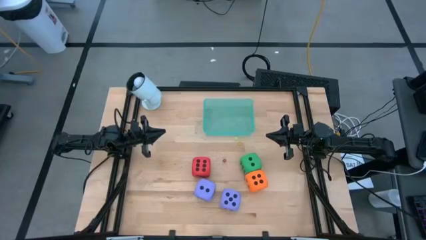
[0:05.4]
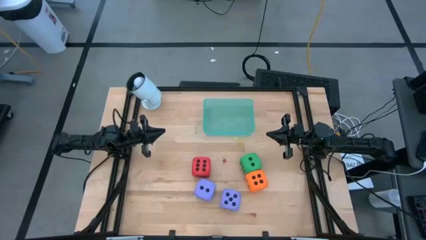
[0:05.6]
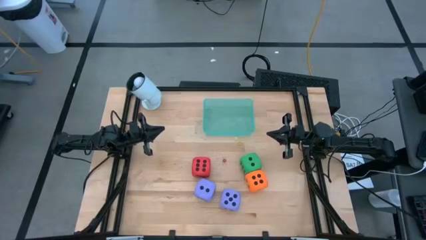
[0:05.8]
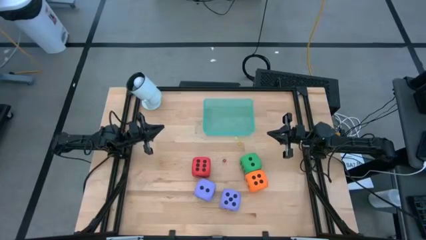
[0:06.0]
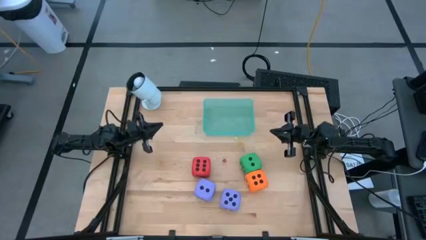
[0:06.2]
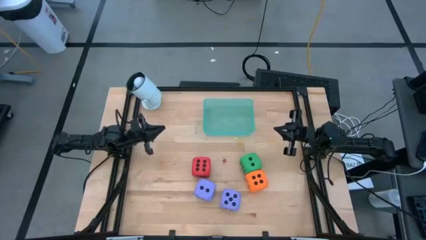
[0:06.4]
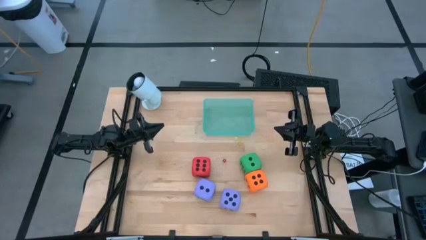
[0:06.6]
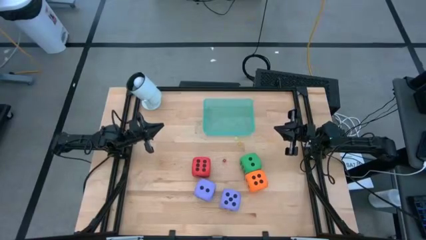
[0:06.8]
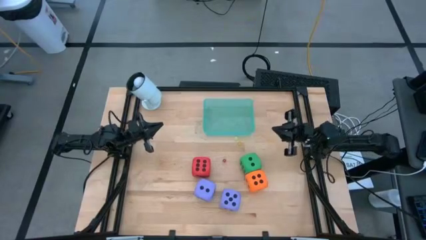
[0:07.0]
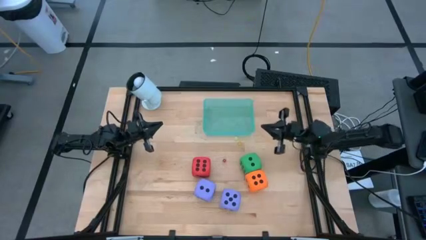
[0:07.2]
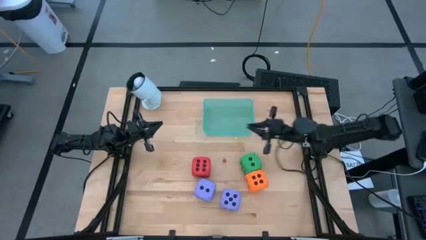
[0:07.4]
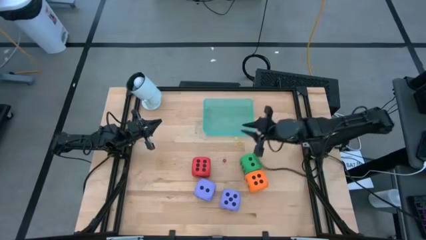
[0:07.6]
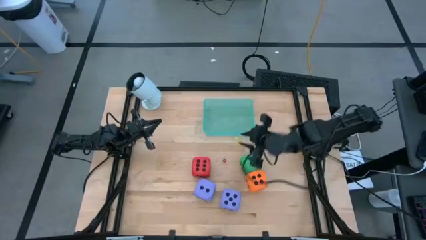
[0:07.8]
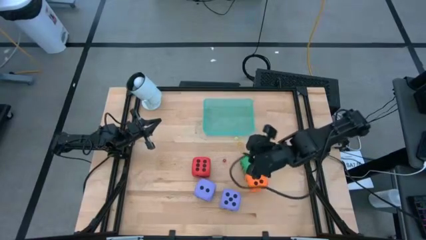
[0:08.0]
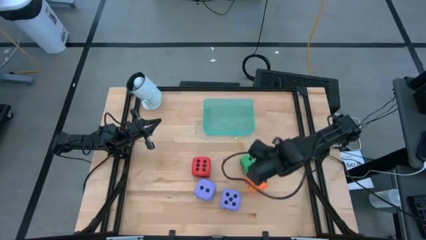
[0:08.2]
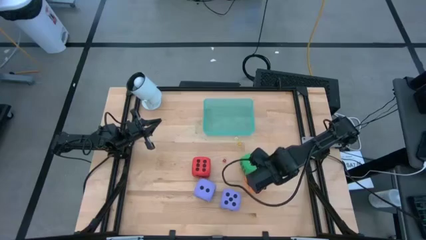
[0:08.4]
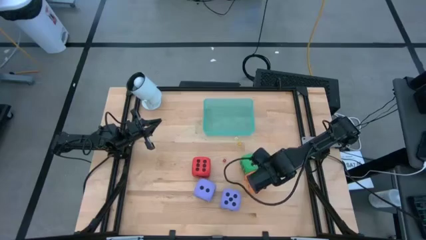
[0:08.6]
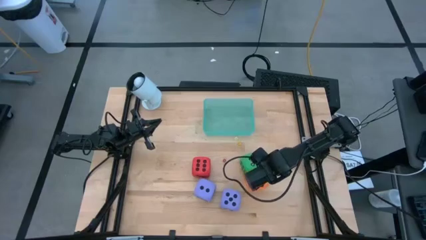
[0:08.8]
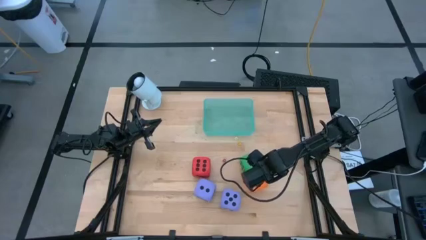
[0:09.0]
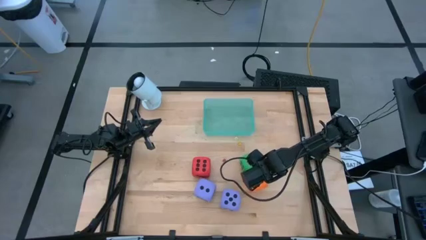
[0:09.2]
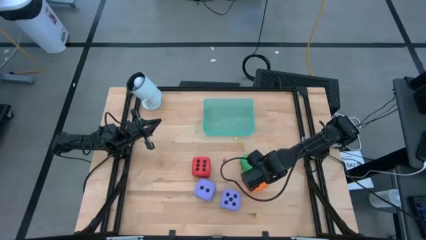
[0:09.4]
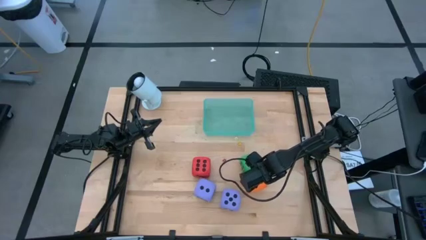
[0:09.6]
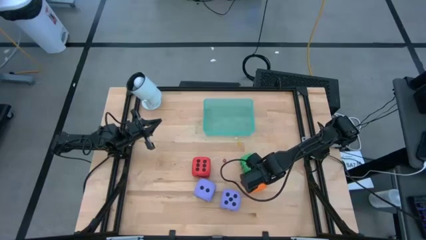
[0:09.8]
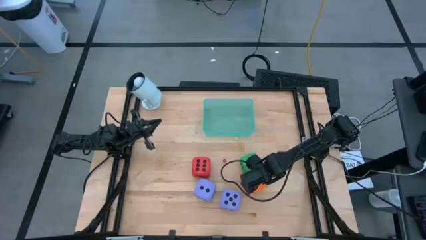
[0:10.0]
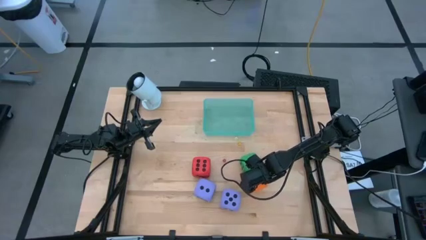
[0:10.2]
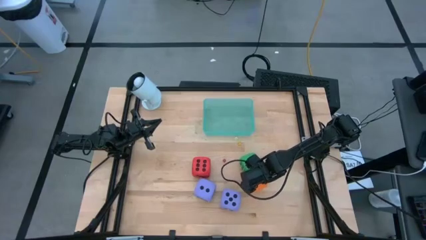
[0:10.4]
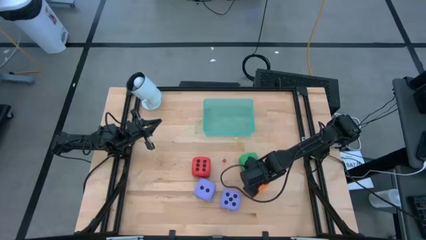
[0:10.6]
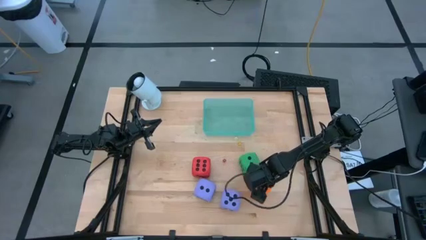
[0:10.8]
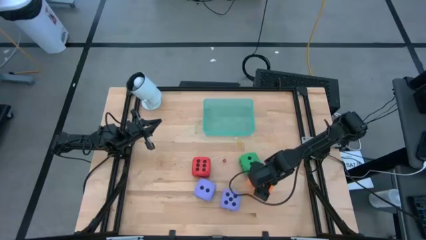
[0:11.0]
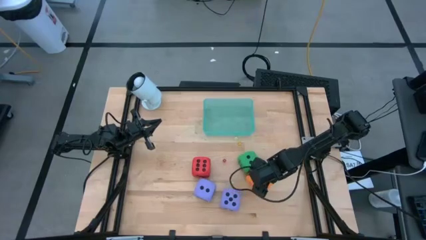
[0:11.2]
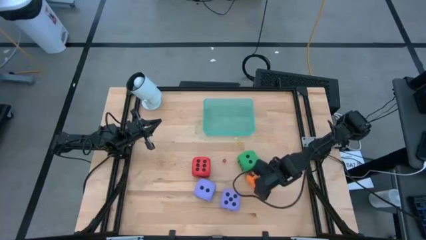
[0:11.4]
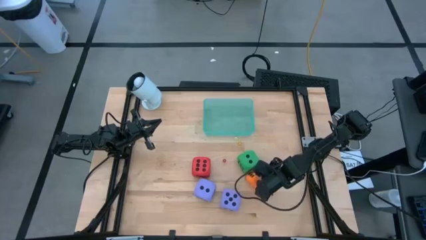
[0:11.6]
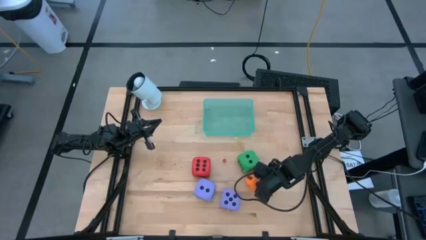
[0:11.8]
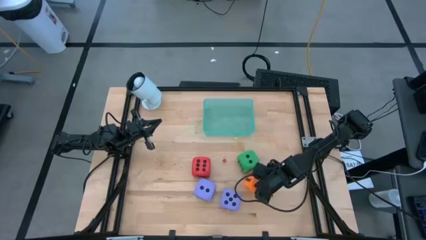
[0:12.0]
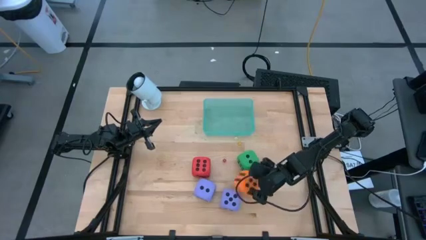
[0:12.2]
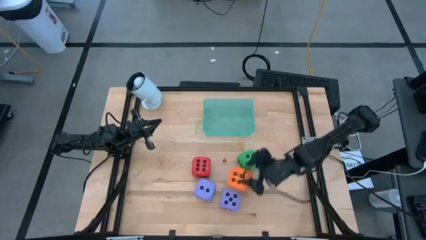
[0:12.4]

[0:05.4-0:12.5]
Task: Pick & Place Dice
Put the big orange die into the green bin

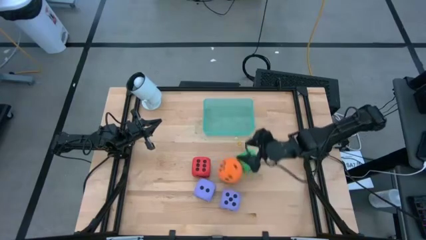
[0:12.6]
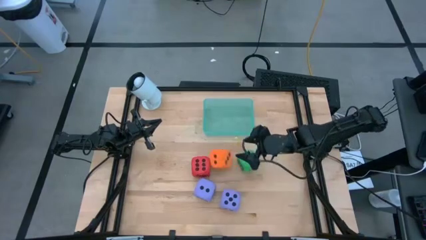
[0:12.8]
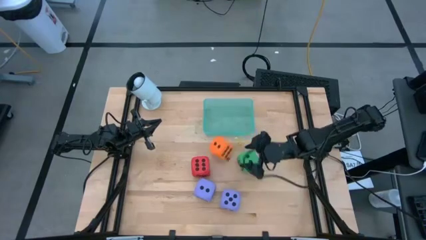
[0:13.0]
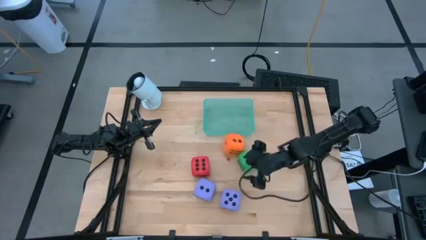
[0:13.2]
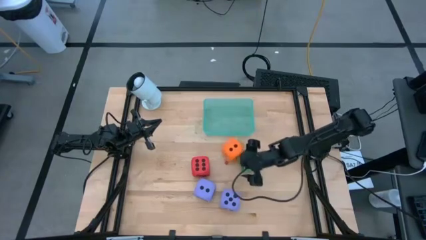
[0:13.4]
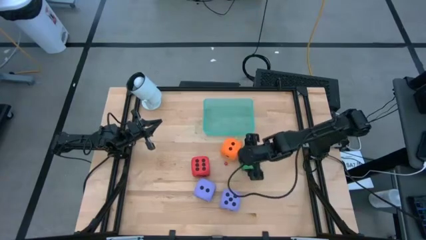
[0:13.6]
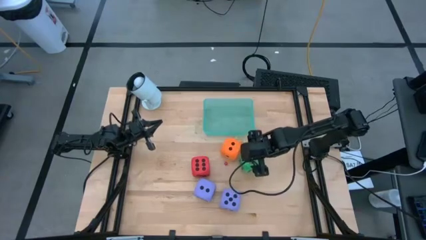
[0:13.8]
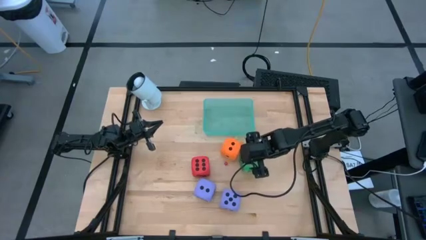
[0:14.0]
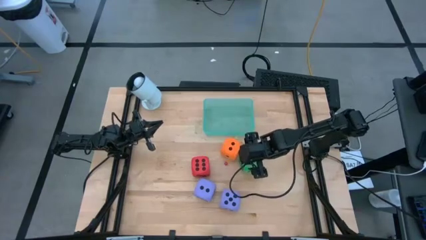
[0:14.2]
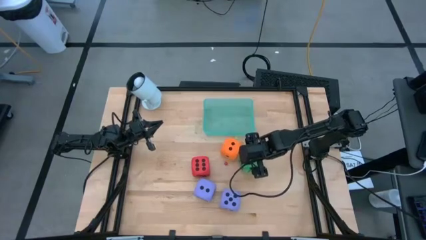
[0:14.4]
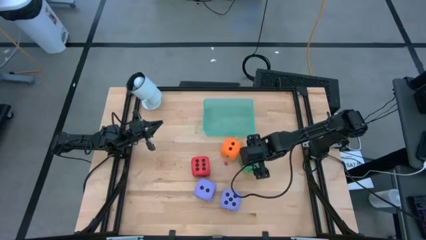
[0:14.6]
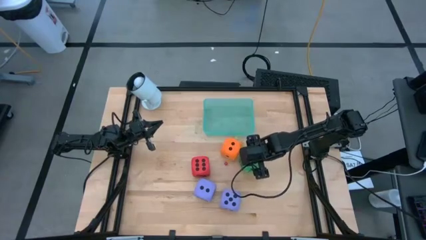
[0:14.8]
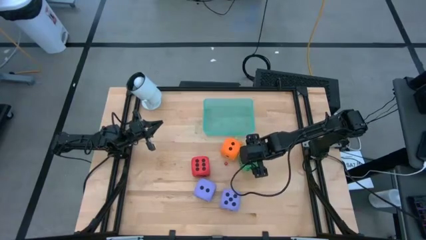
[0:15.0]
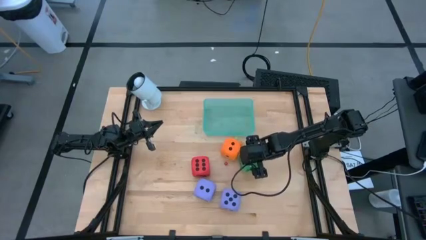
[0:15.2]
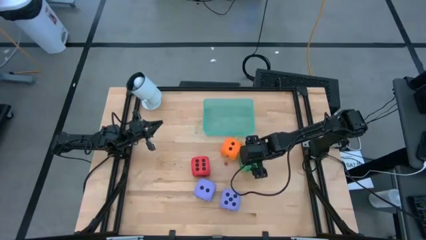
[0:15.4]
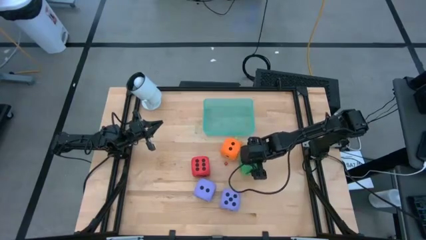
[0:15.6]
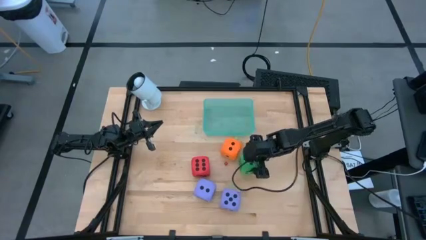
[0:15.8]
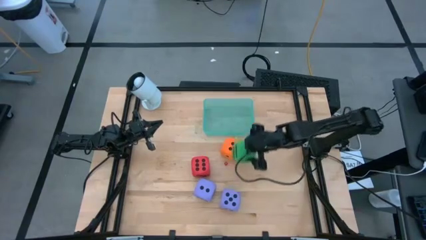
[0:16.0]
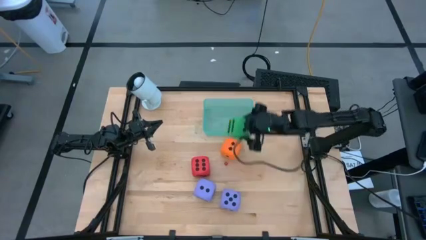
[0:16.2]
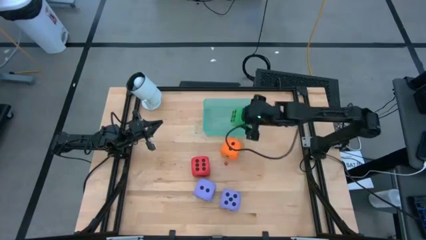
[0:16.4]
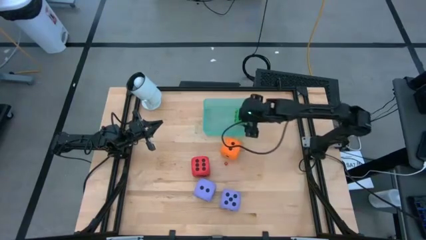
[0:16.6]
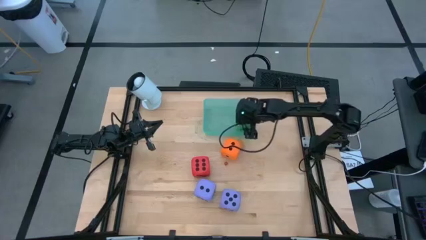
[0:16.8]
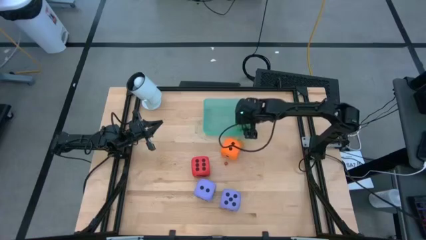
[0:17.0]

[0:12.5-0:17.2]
Put the big green die into the green bin

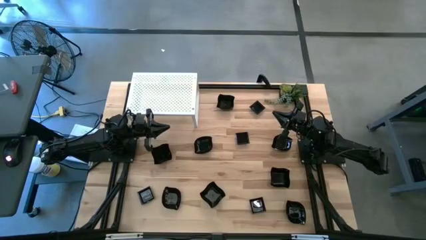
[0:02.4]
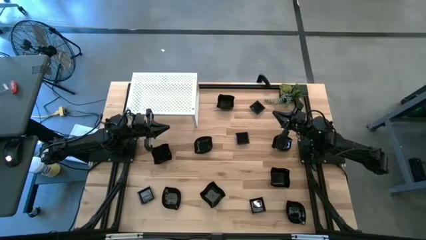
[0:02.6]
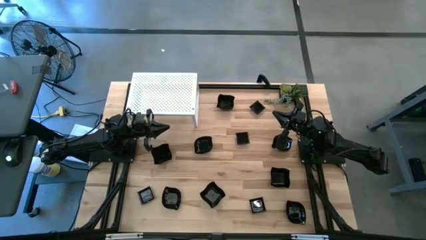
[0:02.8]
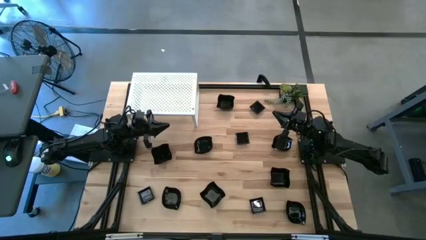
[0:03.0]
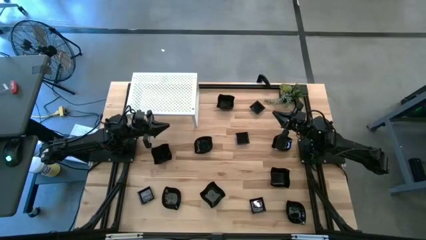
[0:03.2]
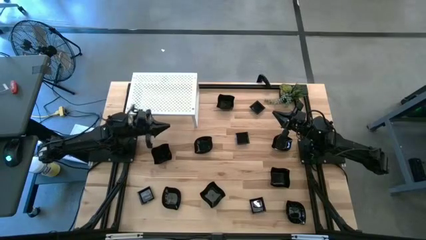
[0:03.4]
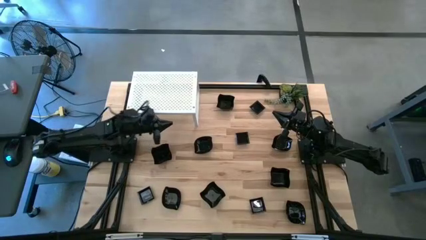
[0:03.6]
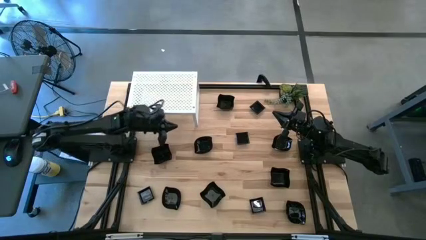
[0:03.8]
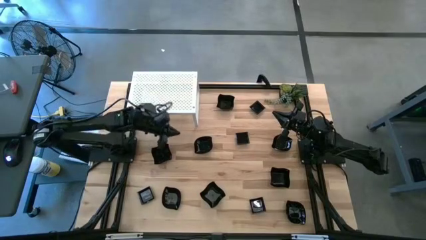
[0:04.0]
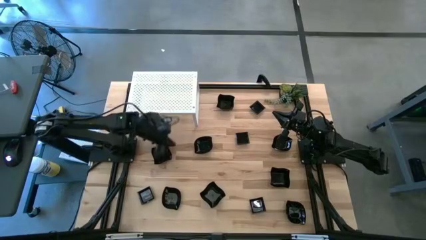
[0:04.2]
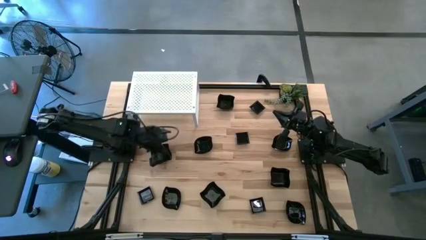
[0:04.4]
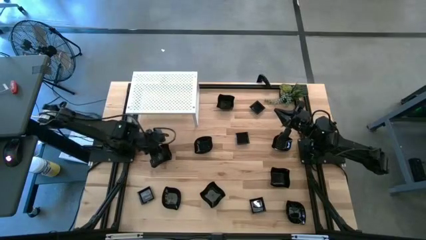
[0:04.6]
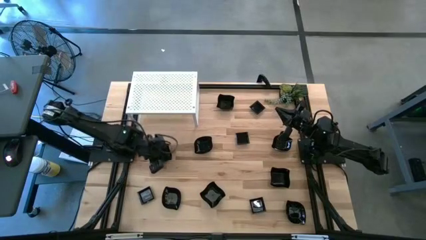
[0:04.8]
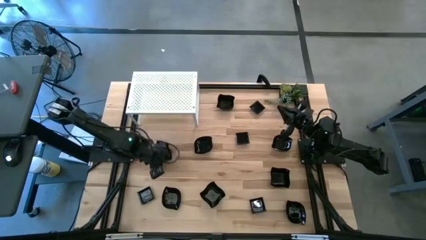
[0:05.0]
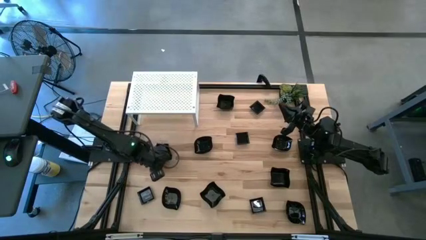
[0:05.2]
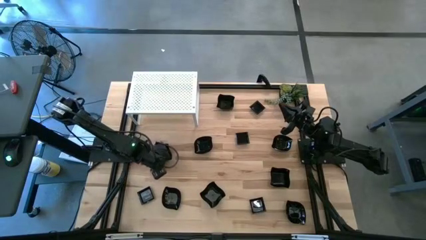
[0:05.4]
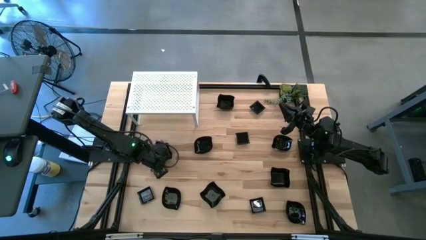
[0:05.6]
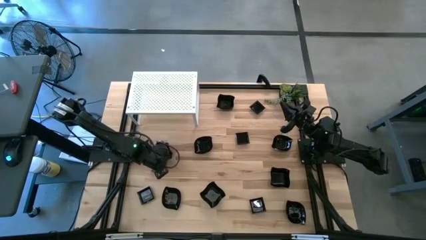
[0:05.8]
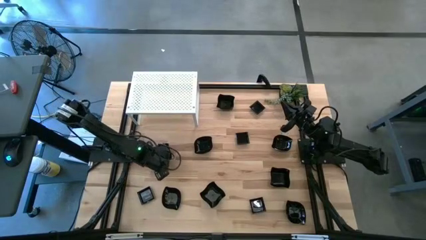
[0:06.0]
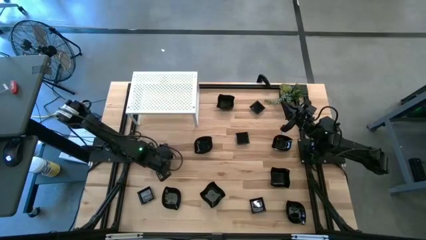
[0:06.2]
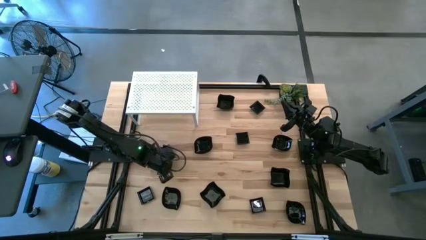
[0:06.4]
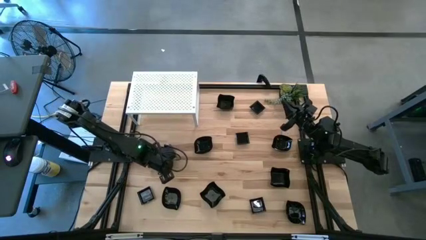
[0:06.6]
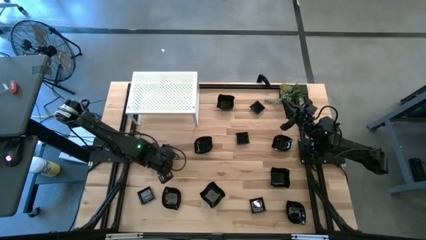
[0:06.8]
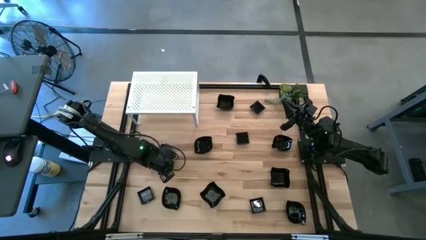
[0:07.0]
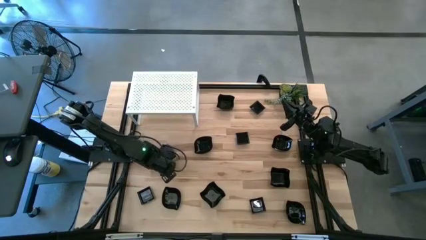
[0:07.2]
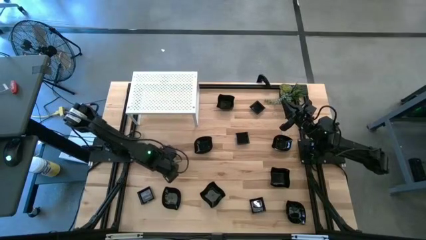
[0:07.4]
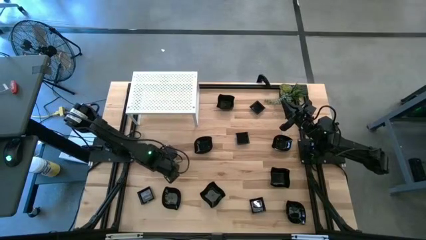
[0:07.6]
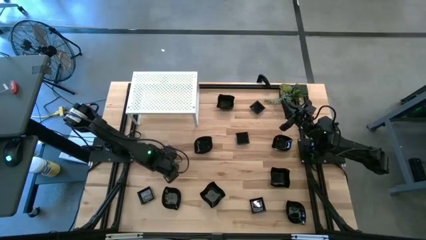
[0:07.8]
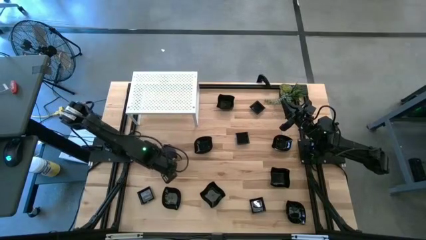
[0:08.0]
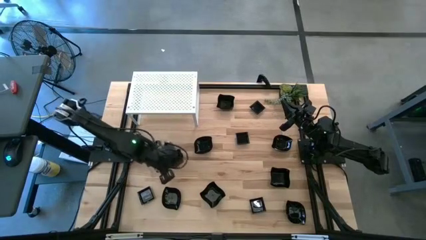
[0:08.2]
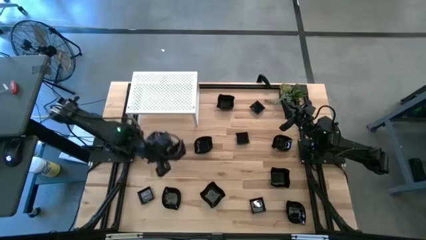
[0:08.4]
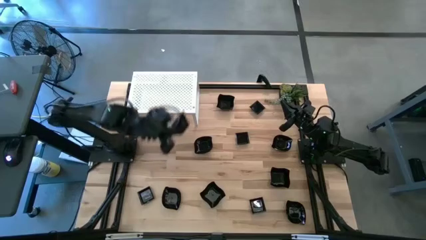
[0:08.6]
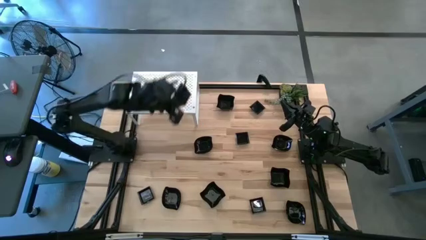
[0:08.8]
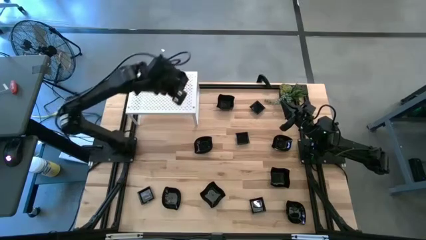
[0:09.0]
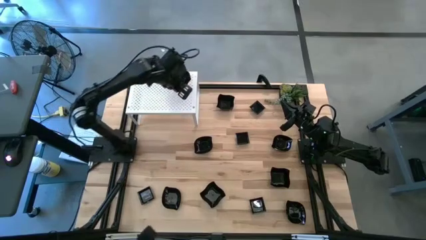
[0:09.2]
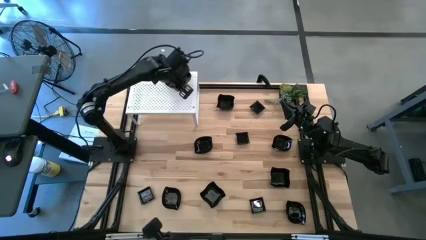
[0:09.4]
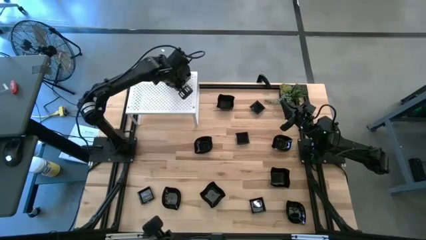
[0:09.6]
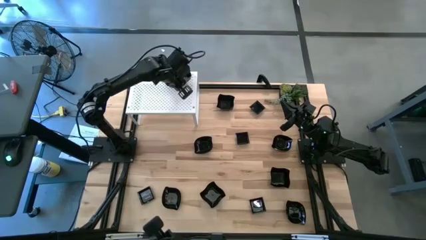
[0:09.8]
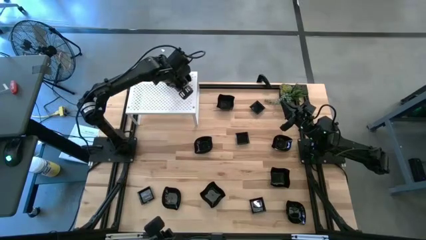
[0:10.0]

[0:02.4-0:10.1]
Task: Pick & Place Mini shaped plates
Put the black distorted square plate on the shelf
